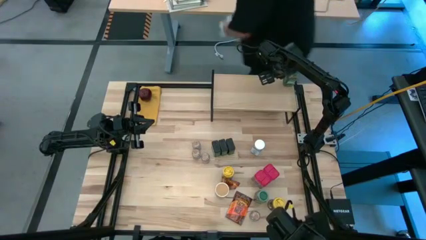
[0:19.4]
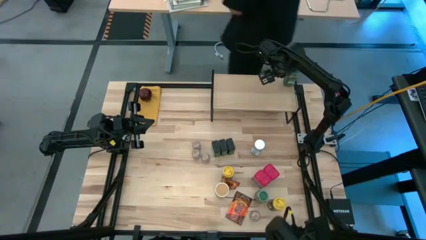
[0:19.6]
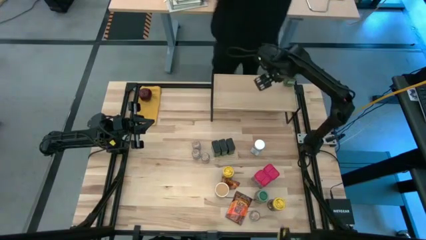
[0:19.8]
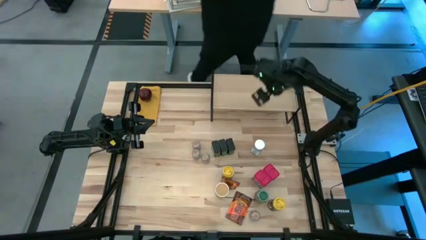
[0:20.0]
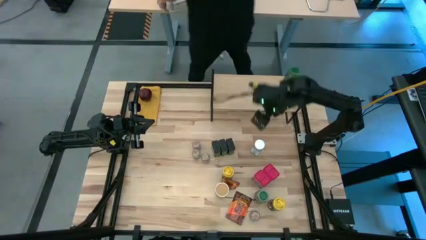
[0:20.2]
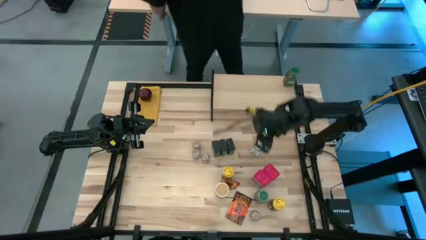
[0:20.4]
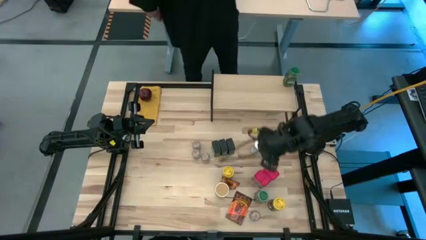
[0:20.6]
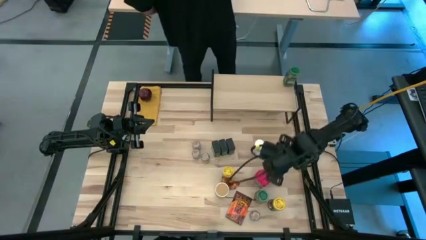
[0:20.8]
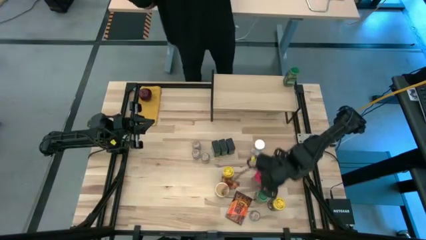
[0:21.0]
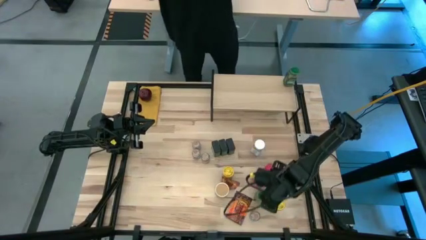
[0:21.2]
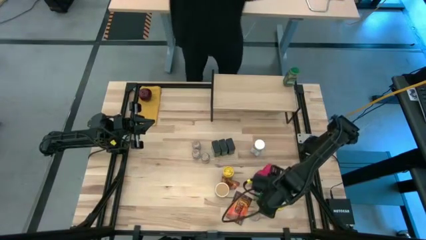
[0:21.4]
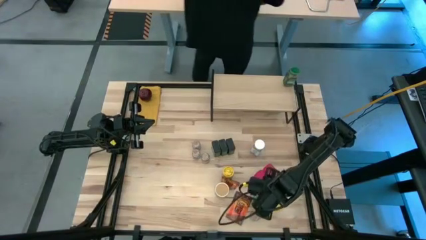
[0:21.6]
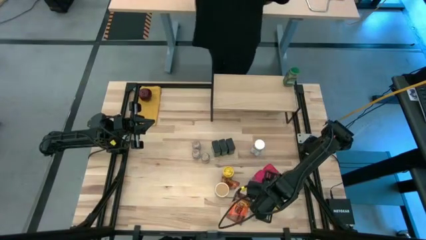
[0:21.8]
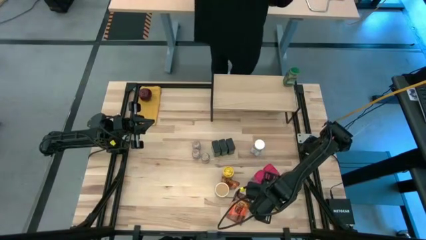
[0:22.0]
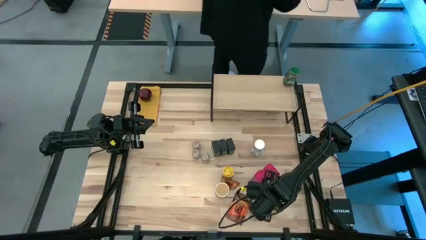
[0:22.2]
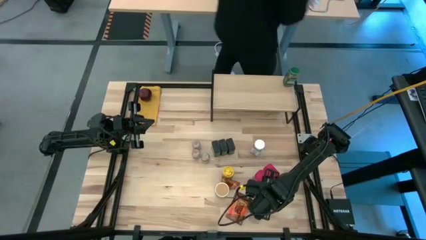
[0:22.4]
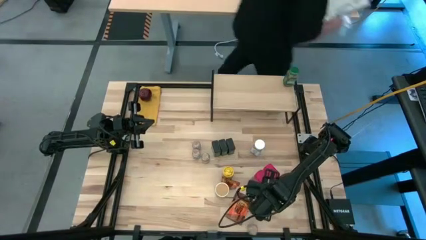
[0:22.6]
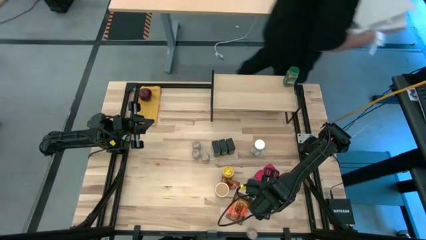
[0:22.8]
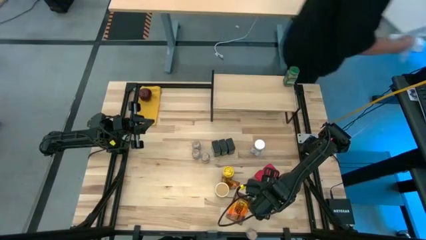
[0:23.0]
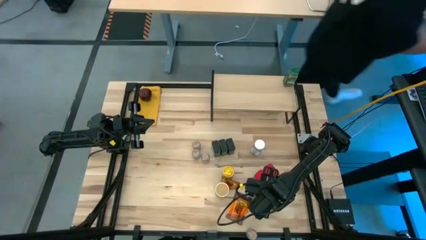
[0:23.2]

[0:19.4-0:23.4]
Task: Shelf spices
Put the green seasoning bottle on the shelf and align it with the other green seasoning bottle

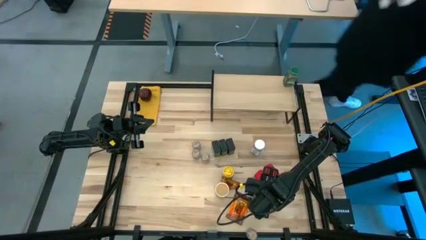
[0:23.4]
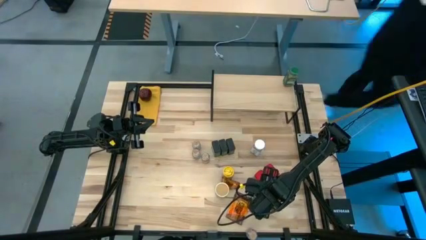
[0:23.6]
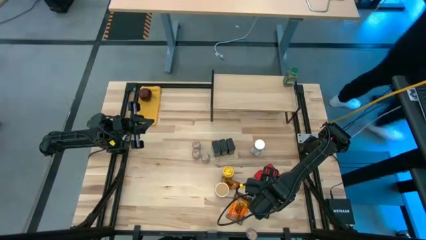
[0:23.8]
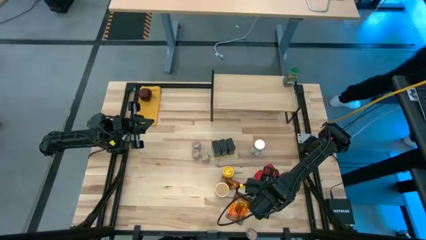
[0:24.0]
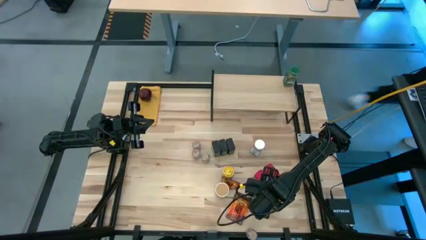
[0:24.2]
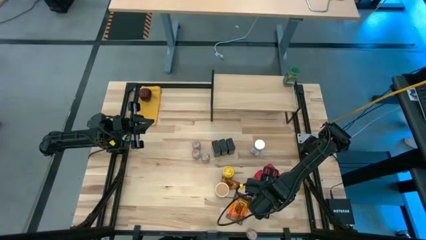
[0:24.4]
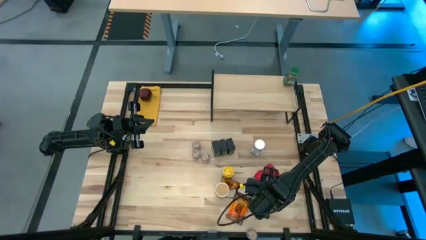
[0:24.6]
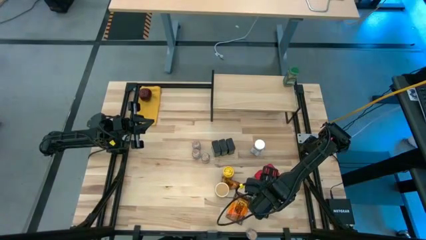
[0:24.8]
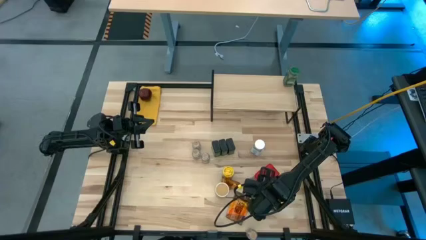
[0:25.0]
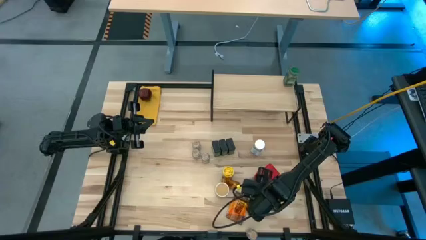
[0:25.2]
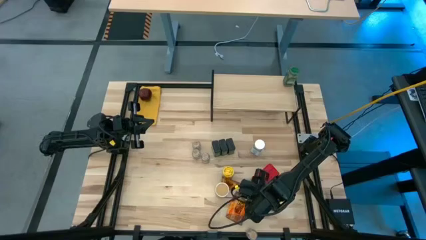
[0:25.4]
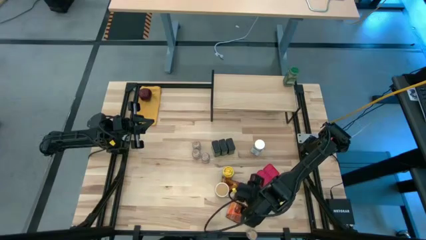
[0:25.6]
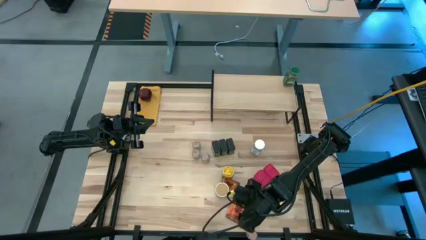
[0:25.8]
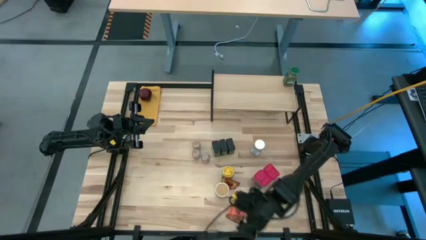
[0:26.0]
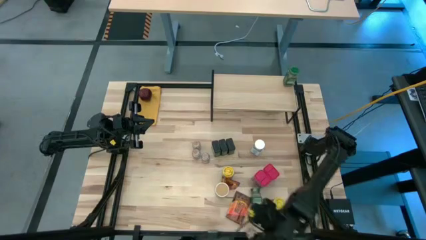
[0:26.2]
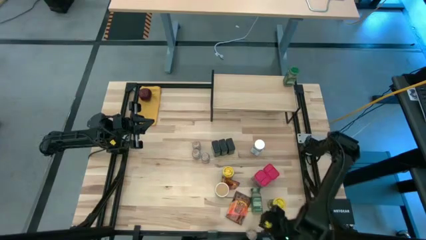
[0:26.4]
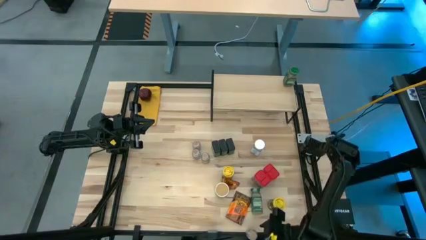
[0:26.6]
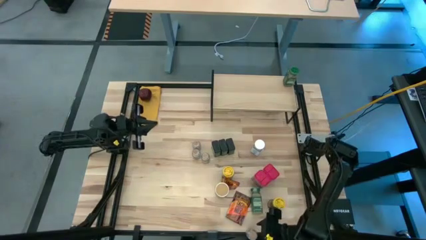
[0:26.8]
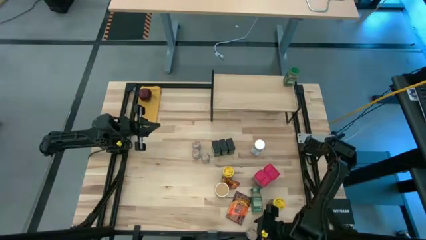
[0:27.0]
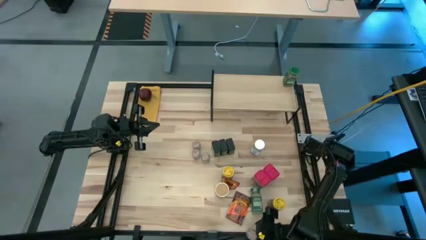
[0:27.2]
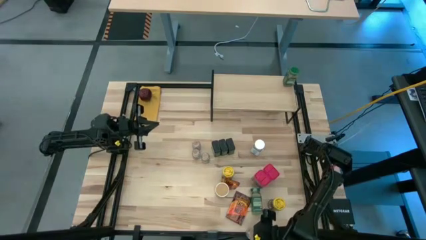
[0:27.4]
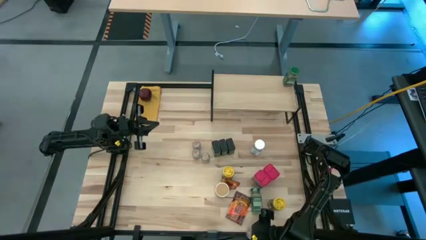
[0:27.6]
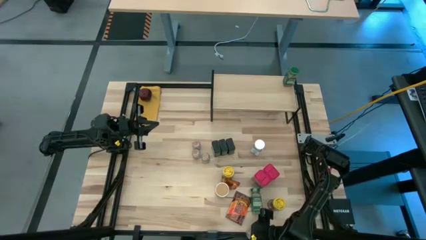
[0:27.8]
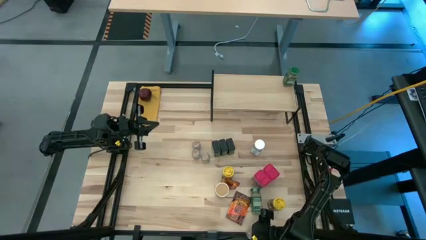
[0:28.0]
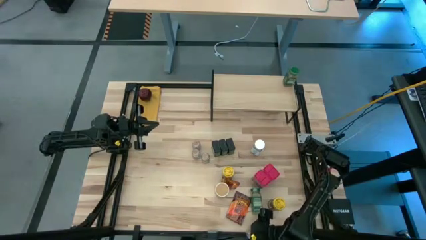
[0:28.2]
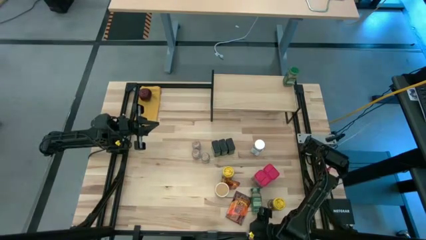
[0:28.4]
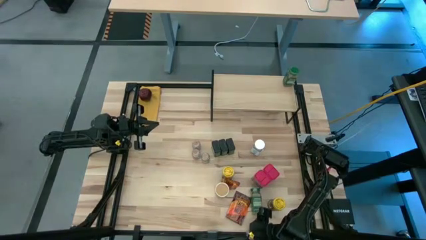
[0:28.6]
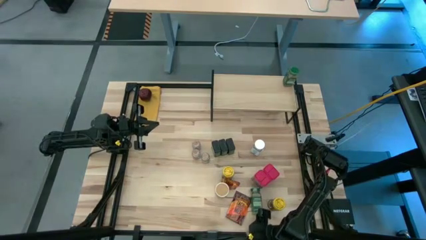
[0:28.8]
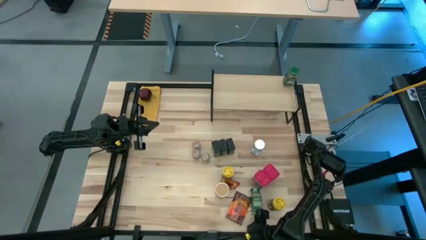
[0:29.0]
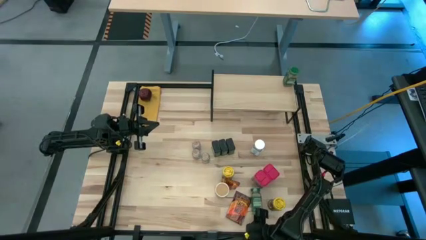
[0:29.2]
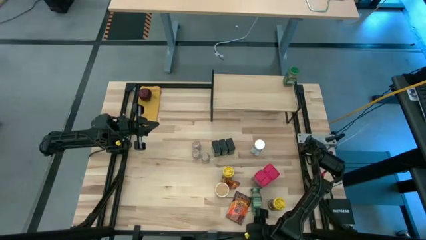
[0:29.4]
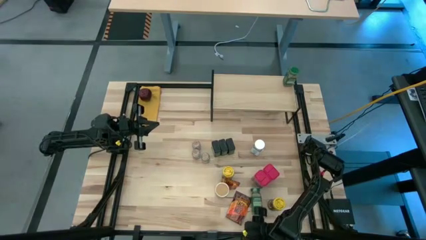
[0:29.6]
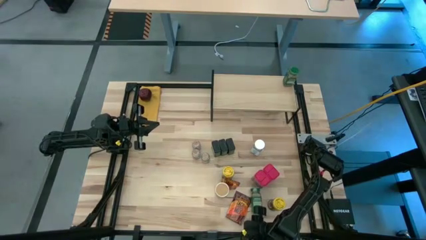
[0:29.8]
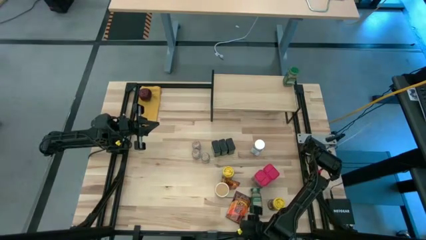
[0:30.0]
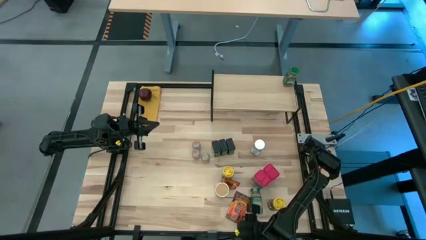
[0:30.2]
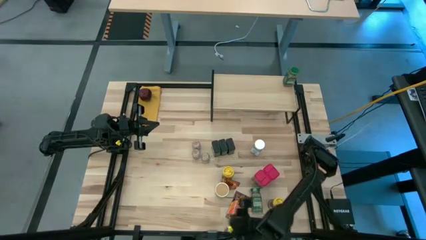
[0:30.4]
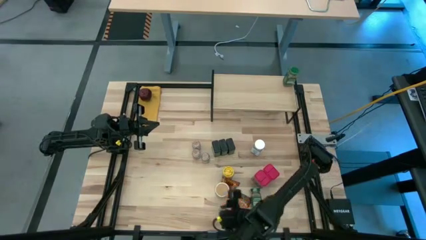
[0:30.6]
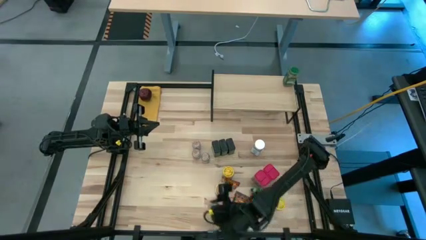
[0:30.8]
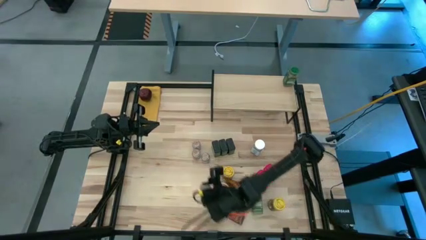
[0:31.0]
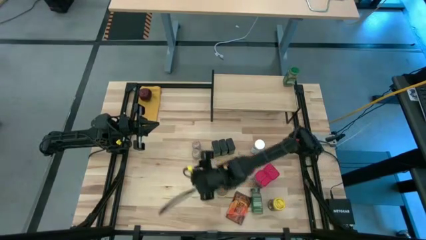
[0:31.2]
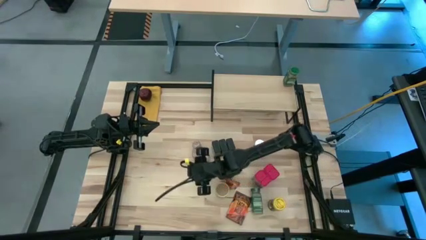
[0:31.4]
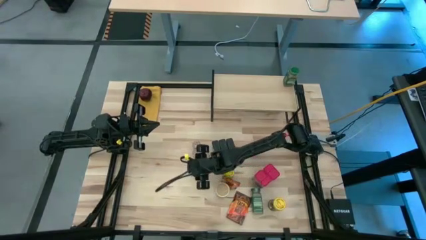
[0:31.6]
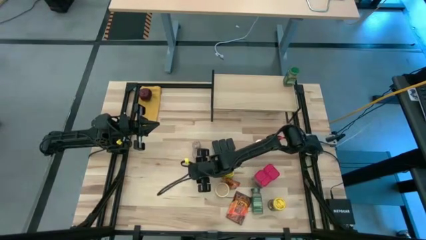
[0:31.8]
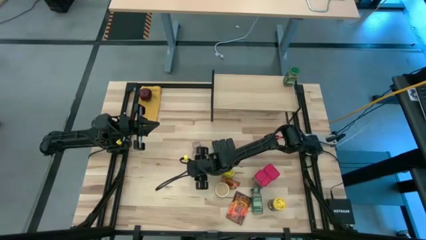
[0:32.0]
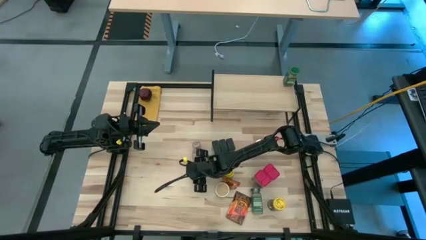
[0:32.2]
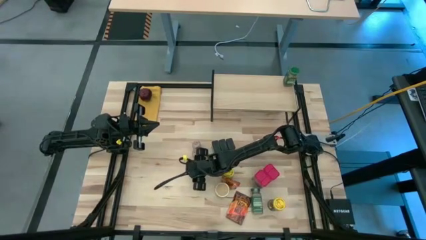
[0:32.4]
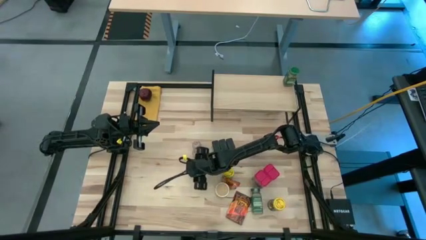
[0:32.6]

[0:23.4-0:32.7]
Move the brown seasoning bottle to the center of the table
